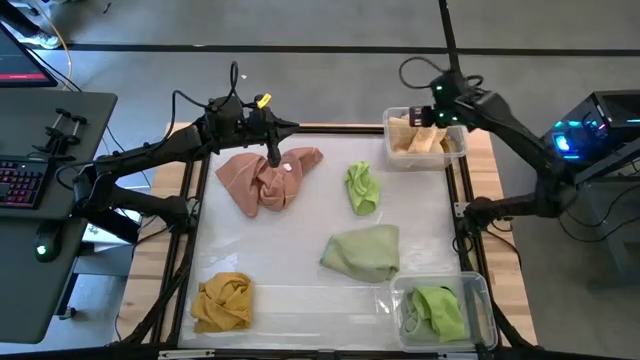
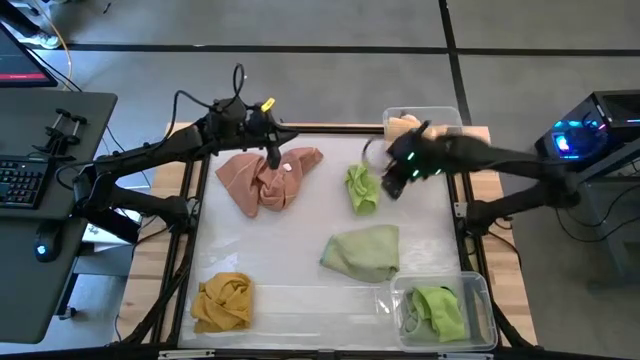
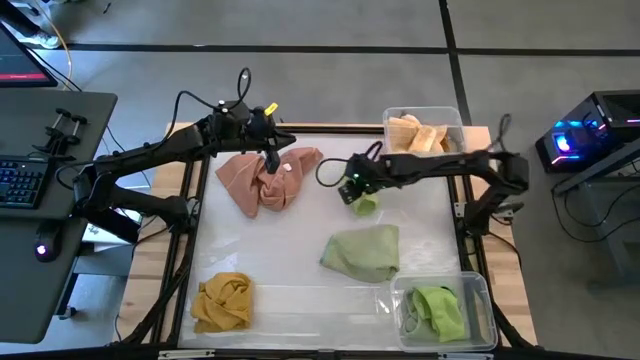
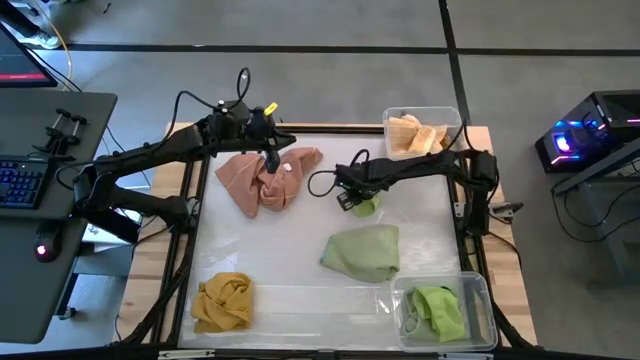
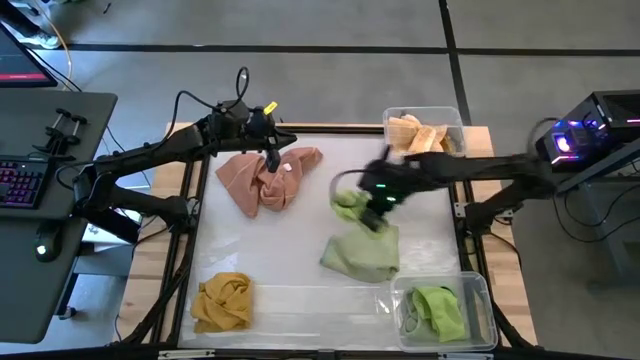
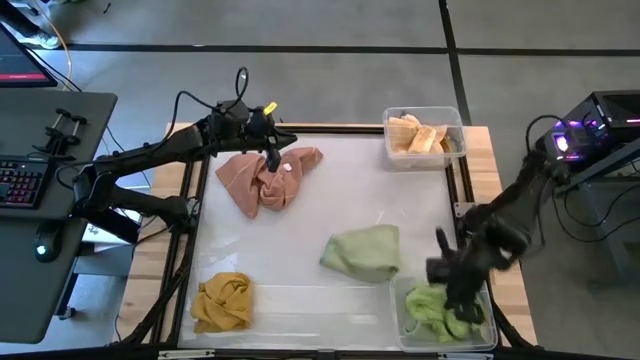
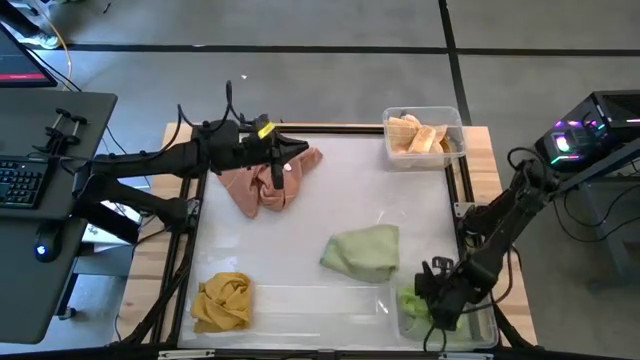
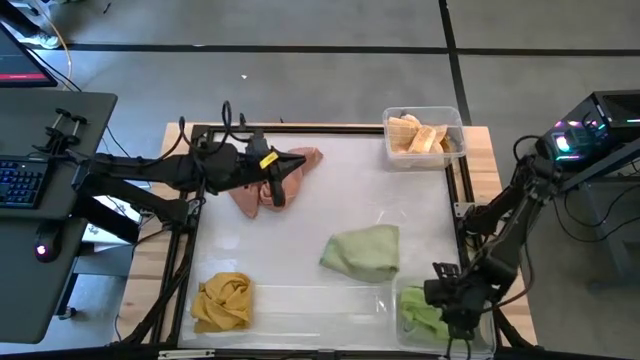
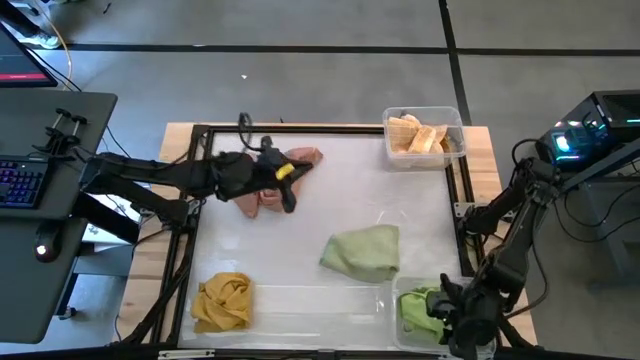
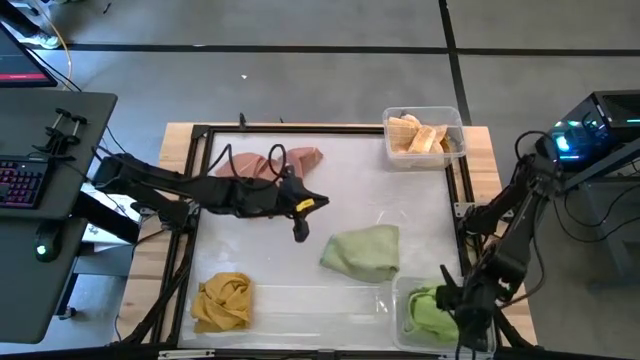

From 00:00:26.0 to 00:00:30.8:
Task: Sort towels by color in basket
Put the light green towel into the bottom transparent bin

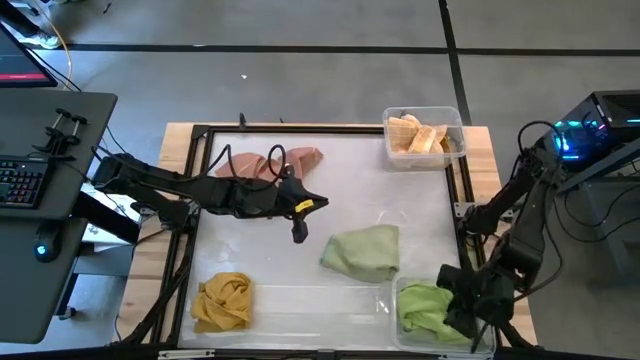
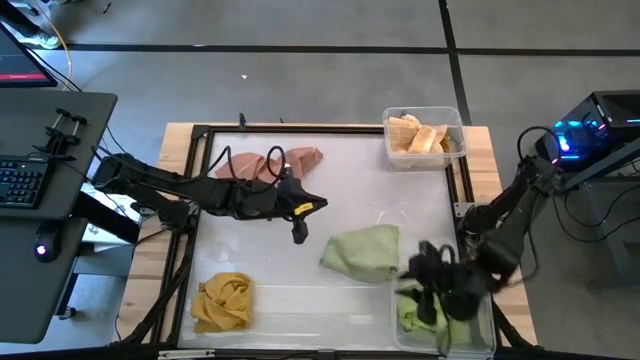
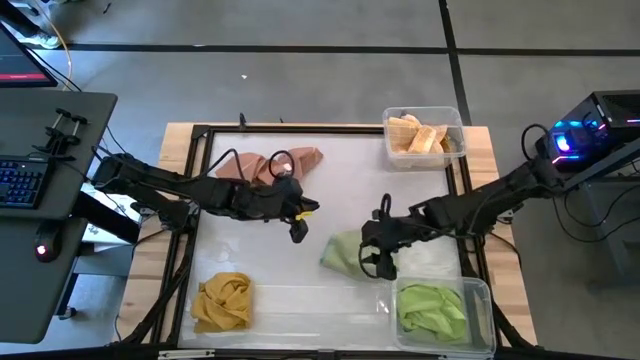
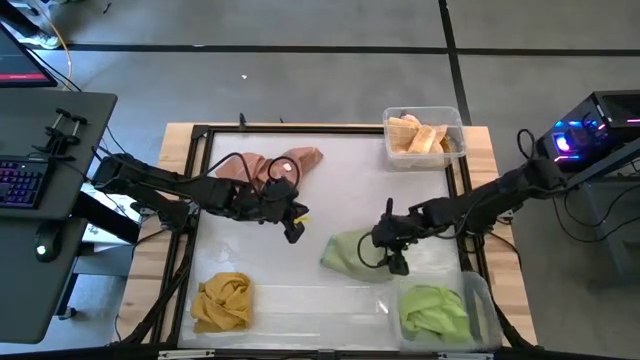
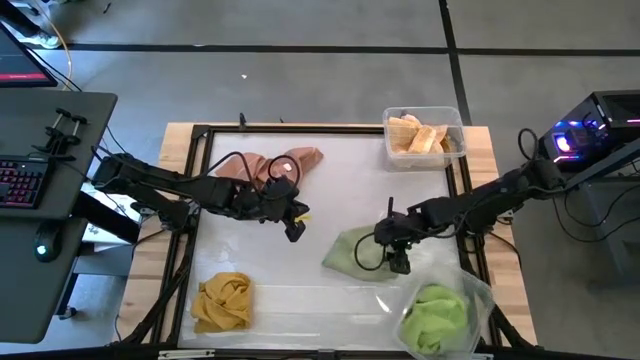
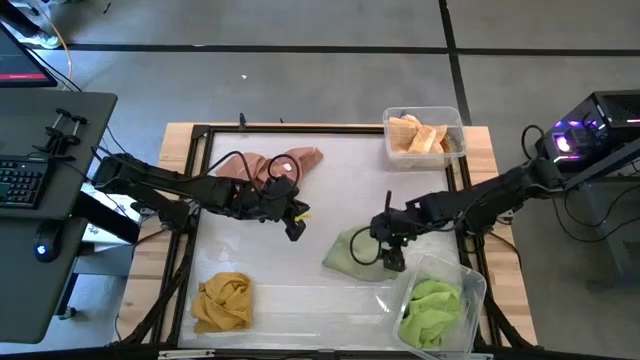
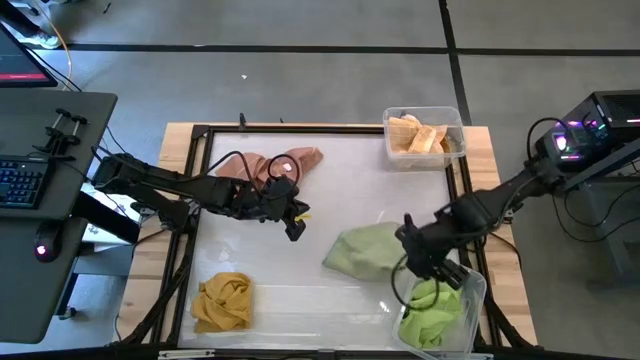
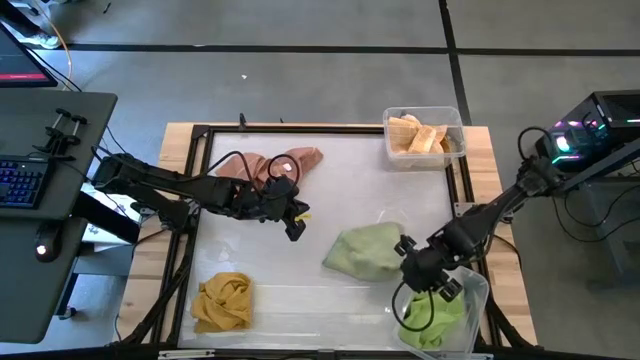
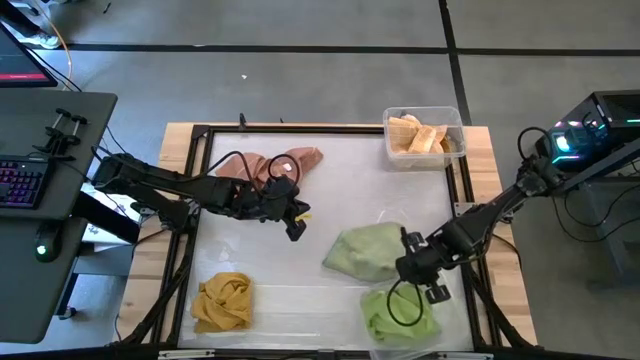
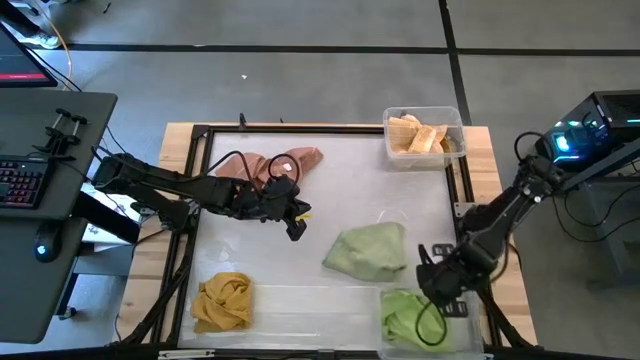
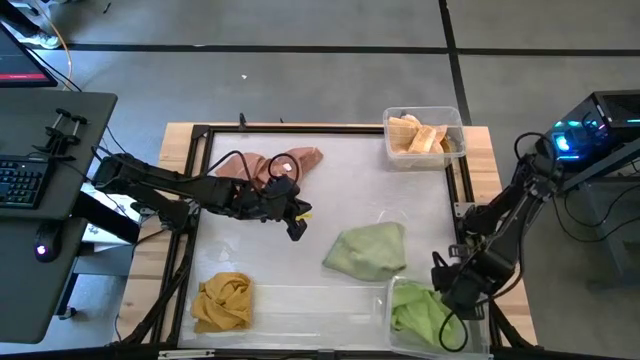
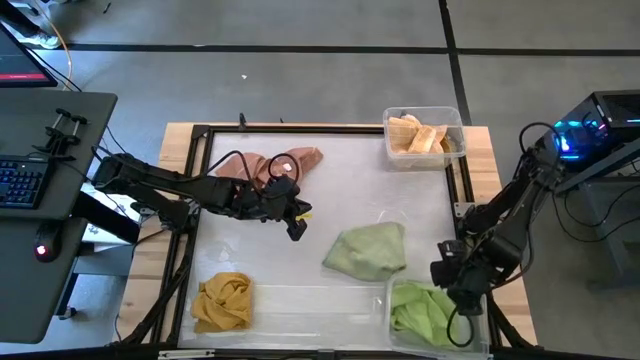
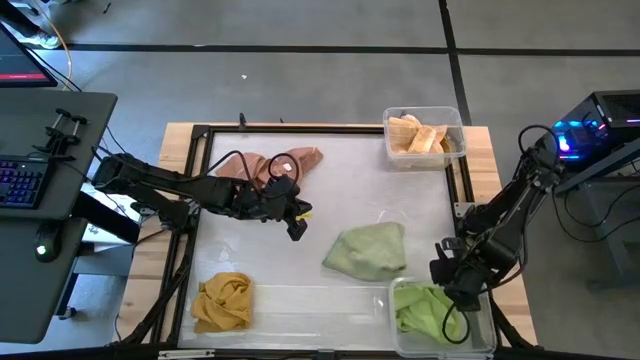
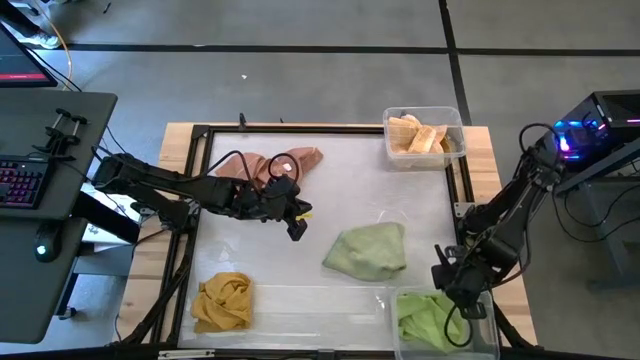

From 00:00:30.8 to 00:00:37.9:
Adjust the bottom transparent bin

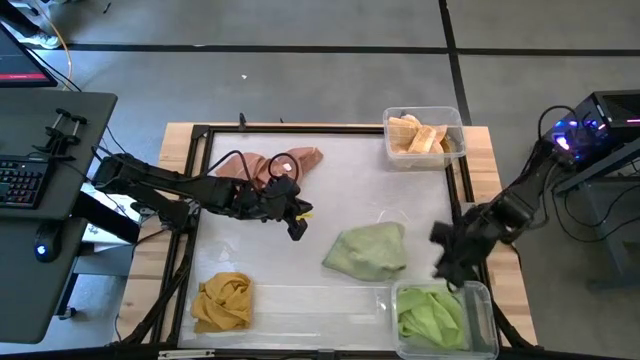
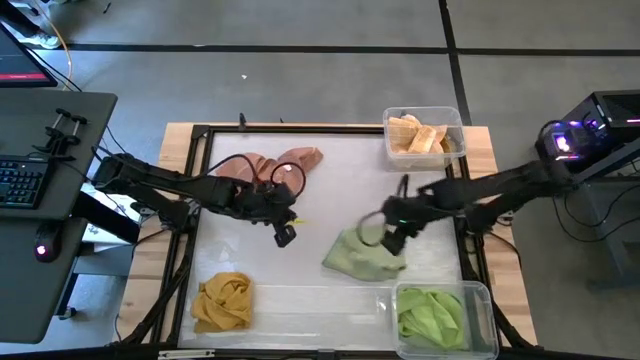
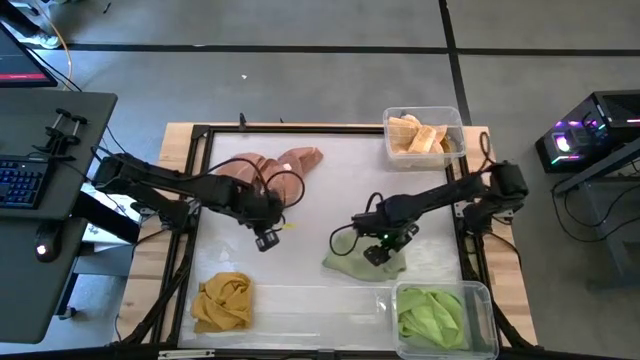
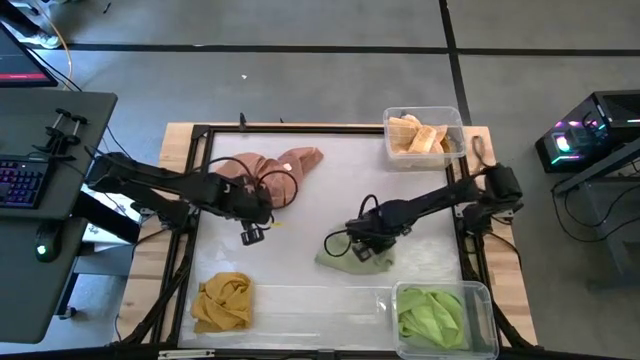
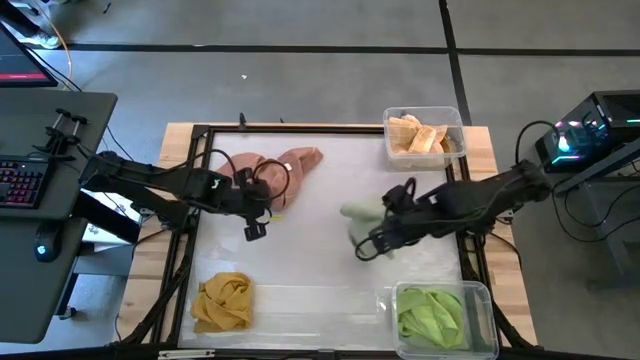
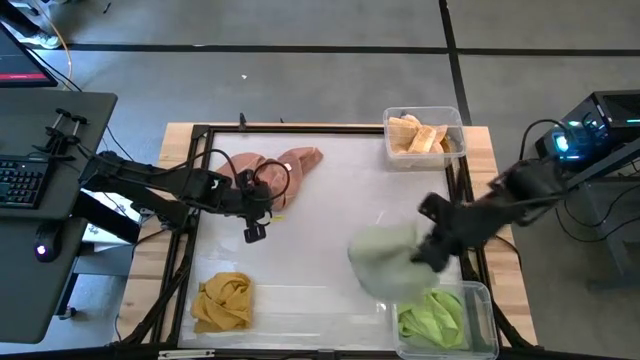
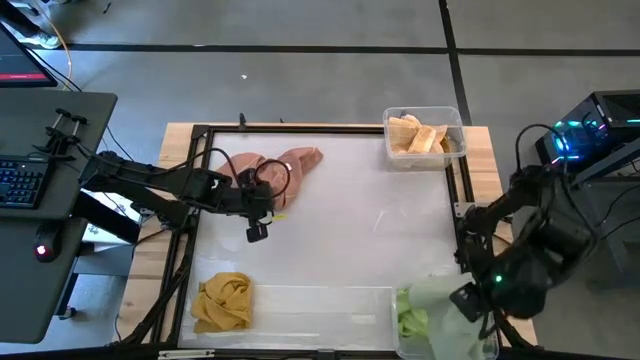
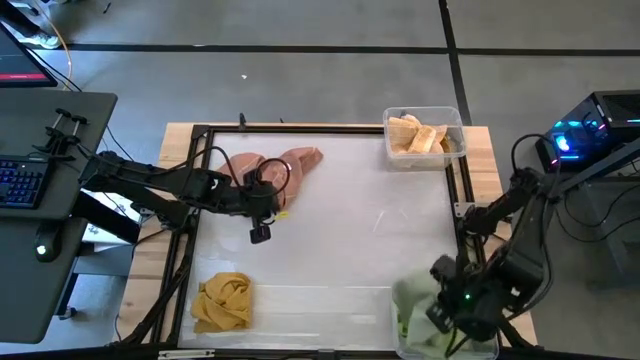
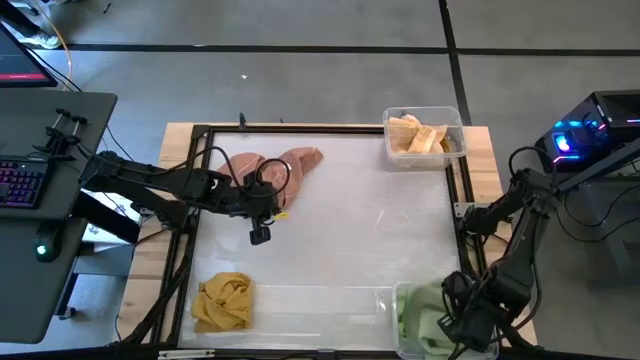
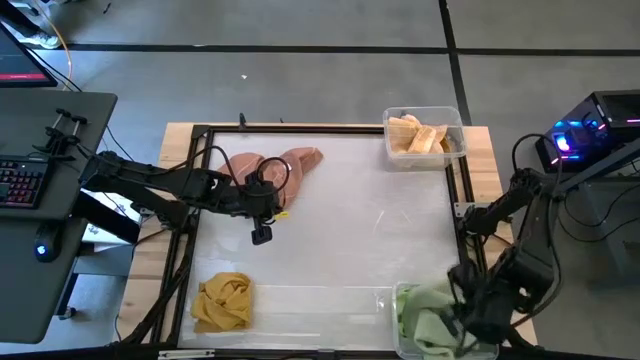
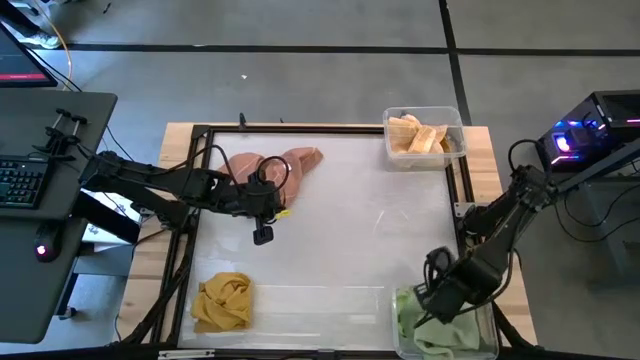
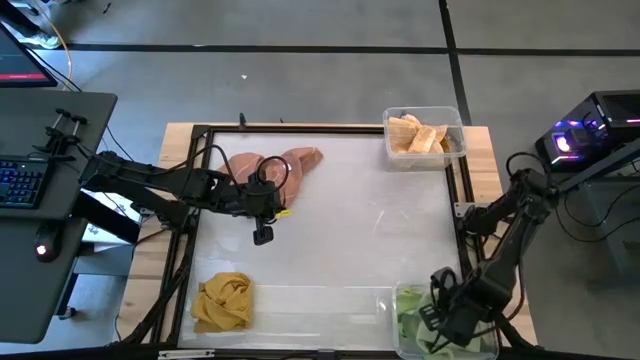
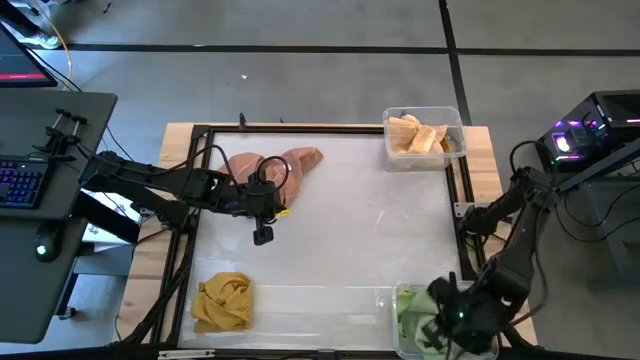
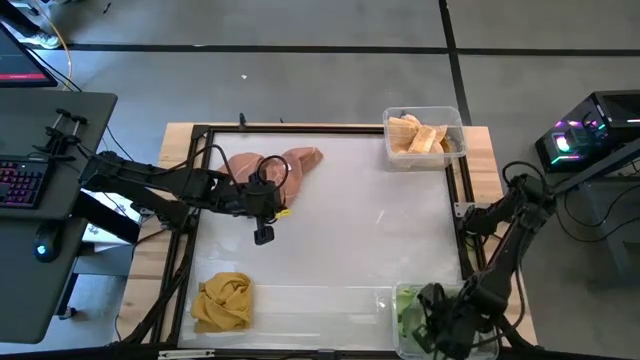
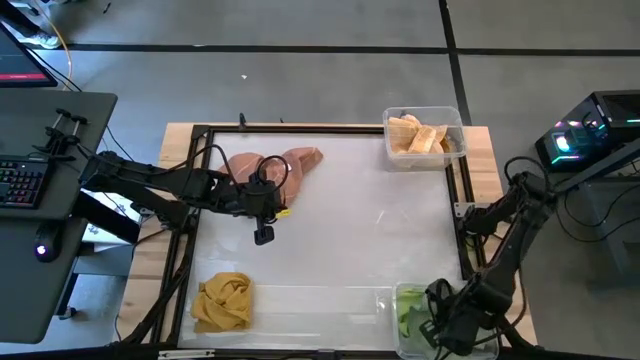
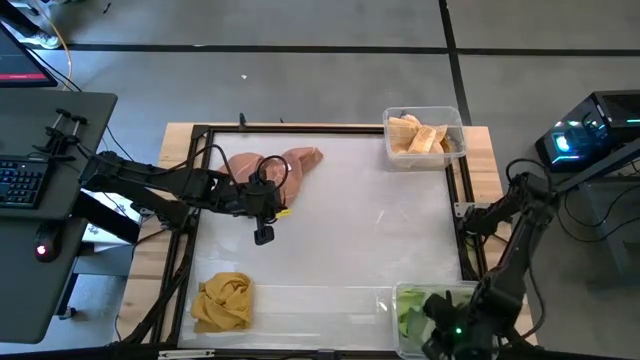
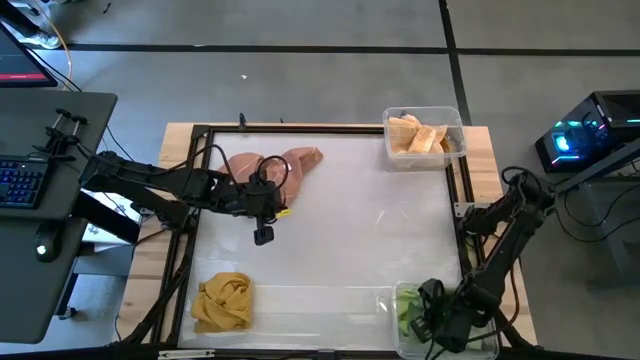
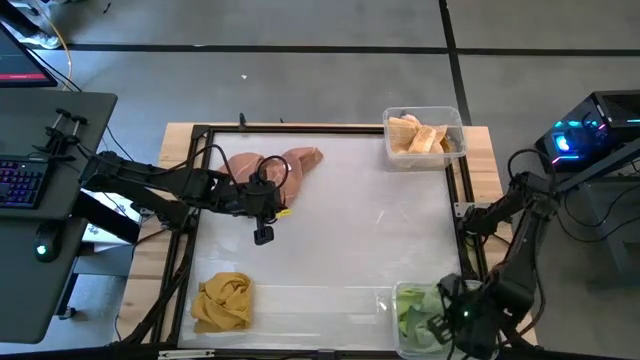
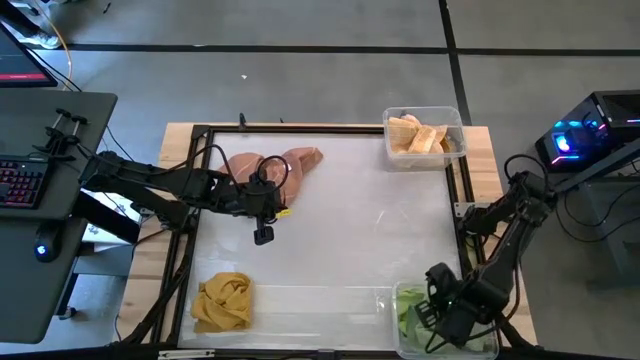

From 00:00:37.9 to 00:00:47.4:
Put the green towel into the bottom transparent bin
